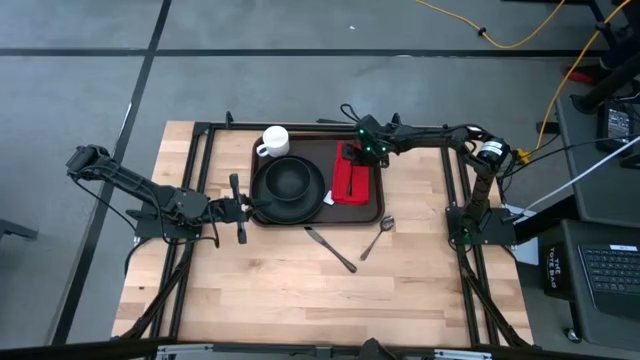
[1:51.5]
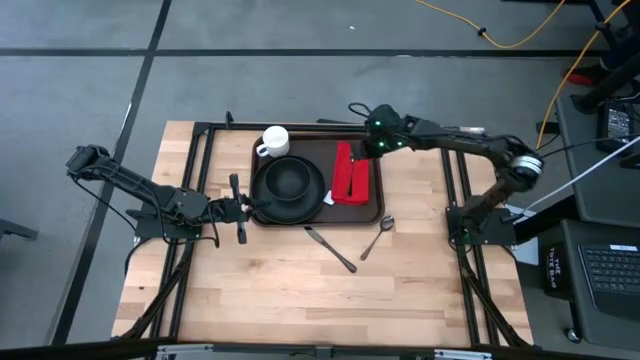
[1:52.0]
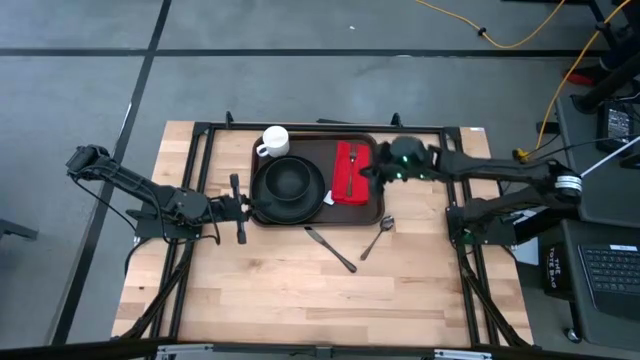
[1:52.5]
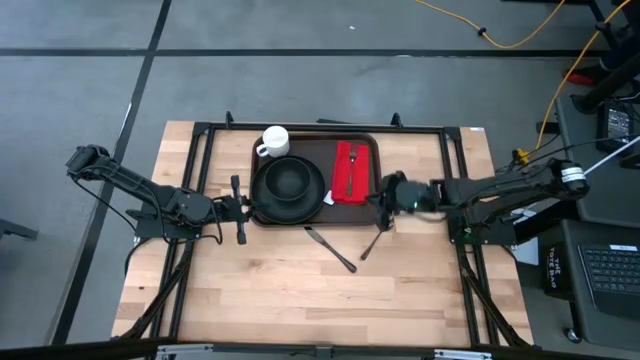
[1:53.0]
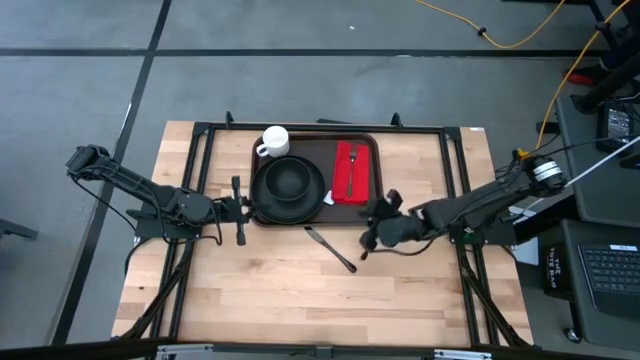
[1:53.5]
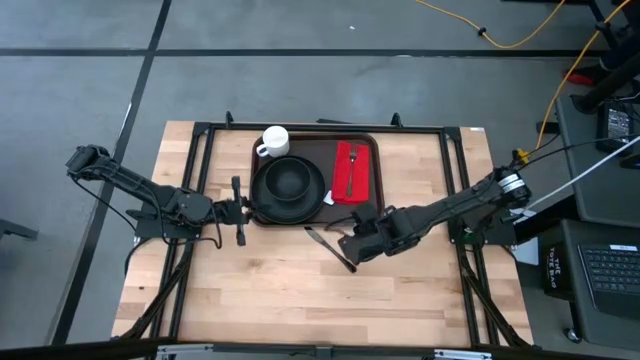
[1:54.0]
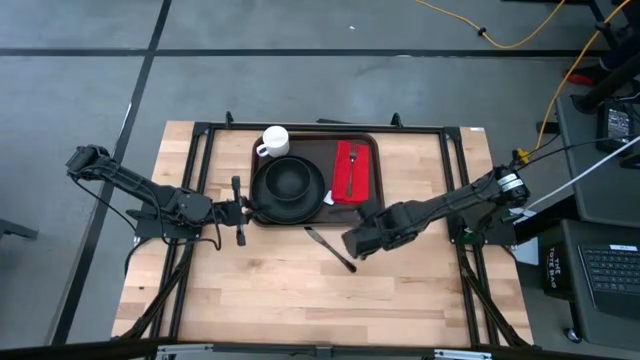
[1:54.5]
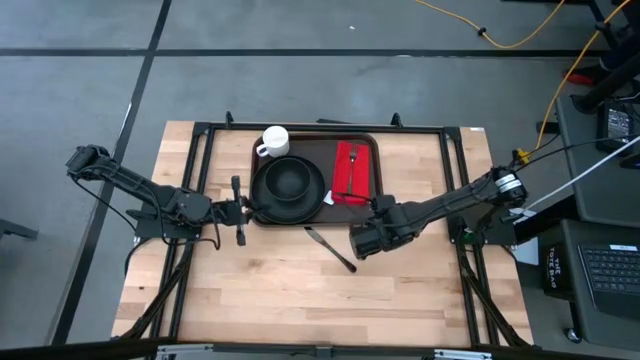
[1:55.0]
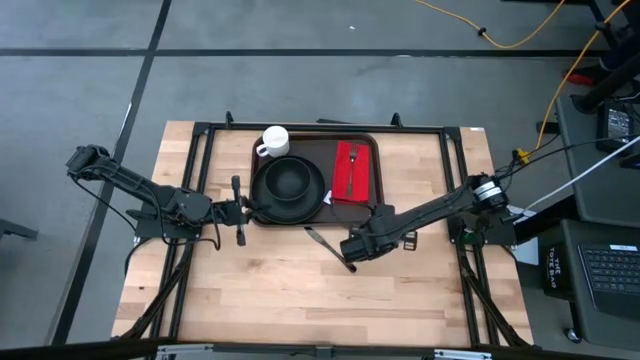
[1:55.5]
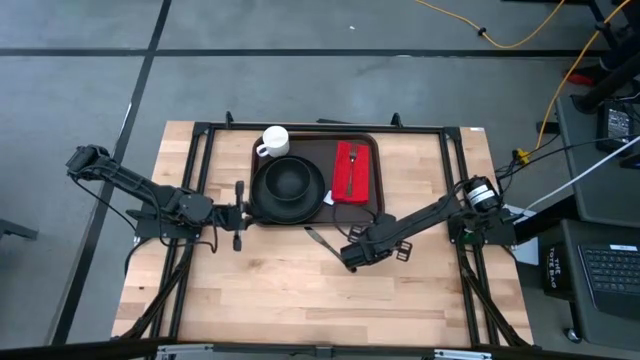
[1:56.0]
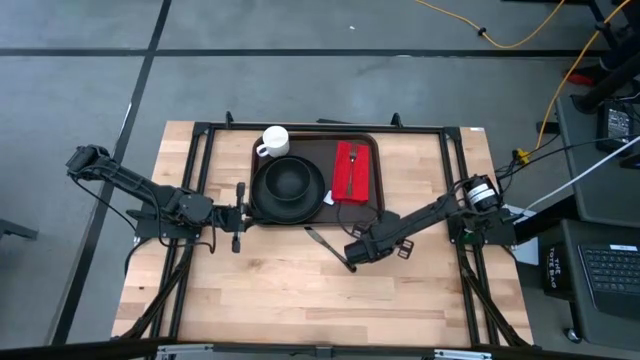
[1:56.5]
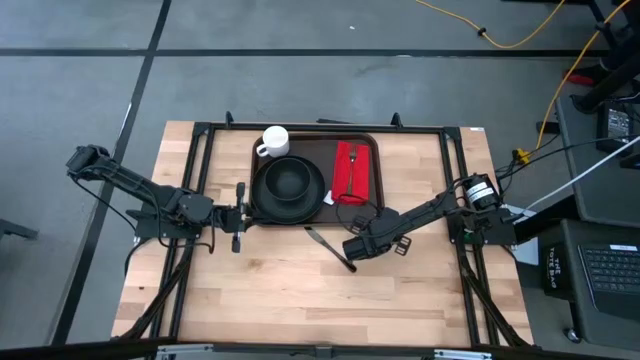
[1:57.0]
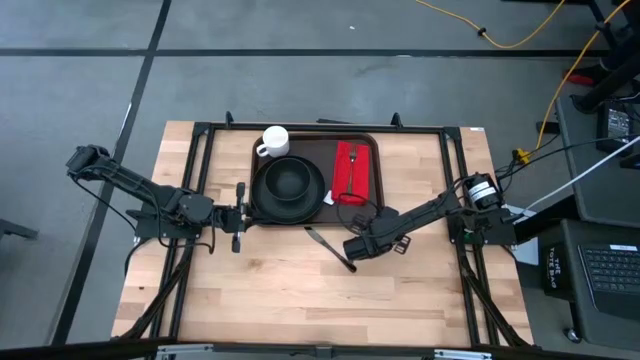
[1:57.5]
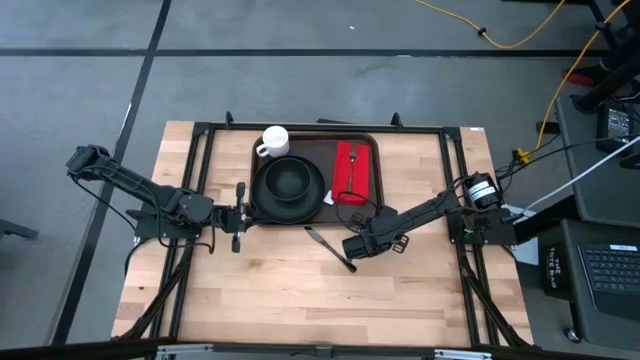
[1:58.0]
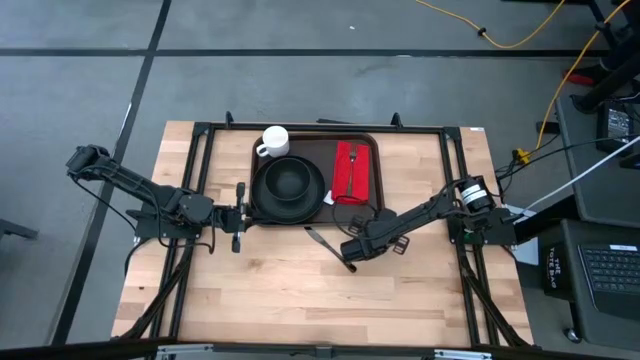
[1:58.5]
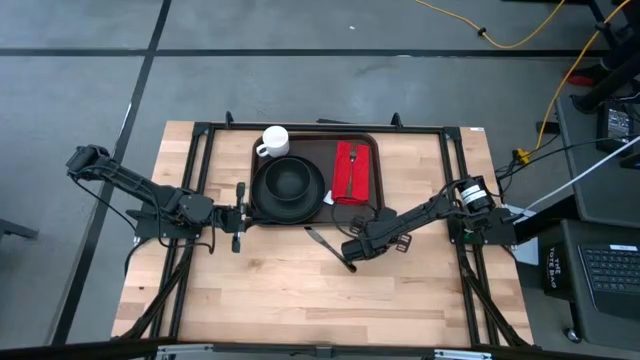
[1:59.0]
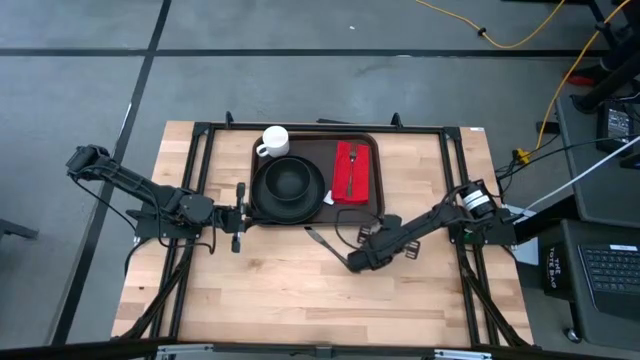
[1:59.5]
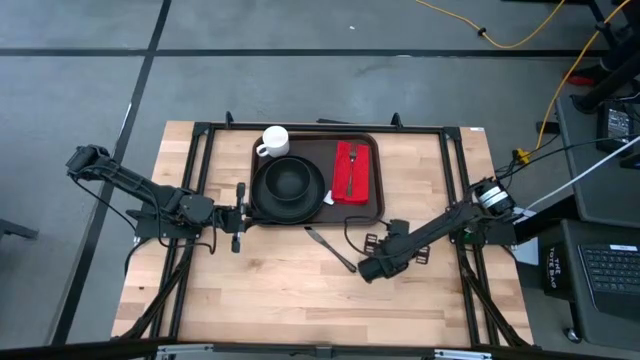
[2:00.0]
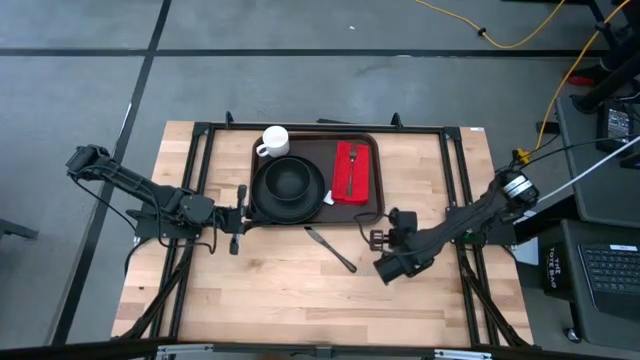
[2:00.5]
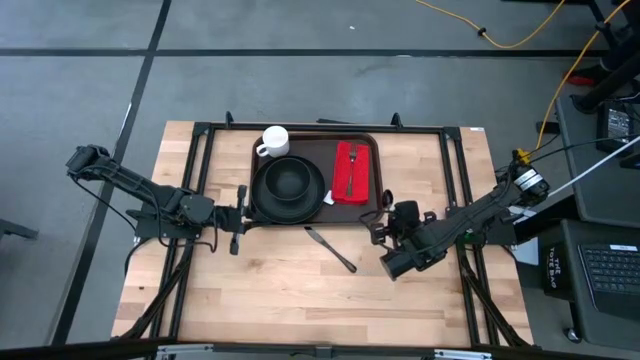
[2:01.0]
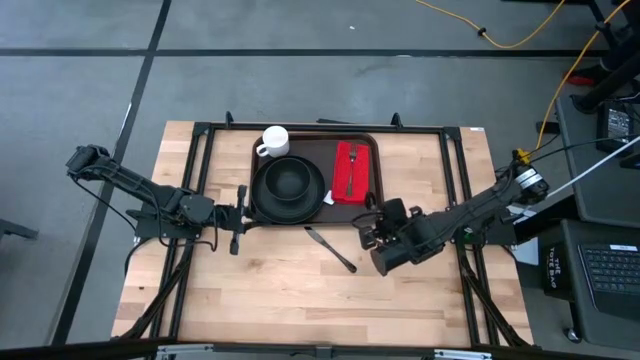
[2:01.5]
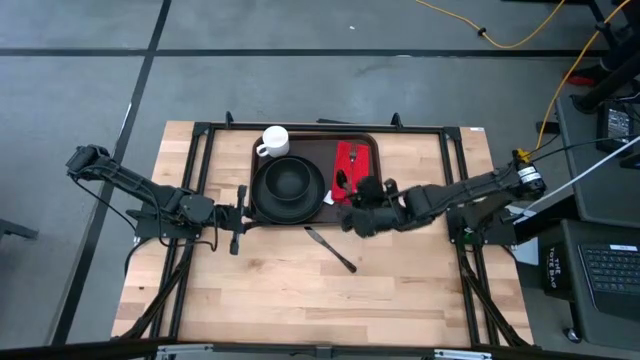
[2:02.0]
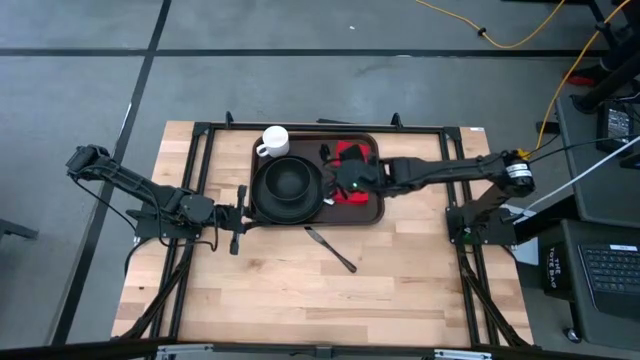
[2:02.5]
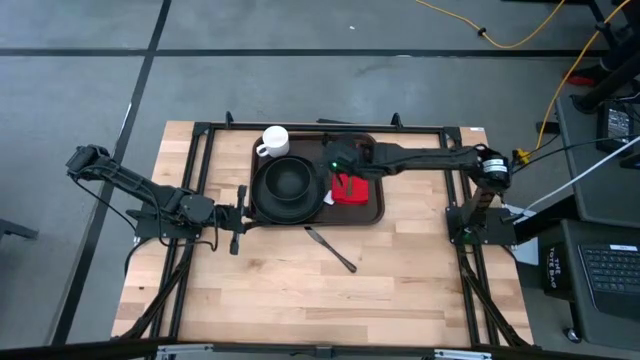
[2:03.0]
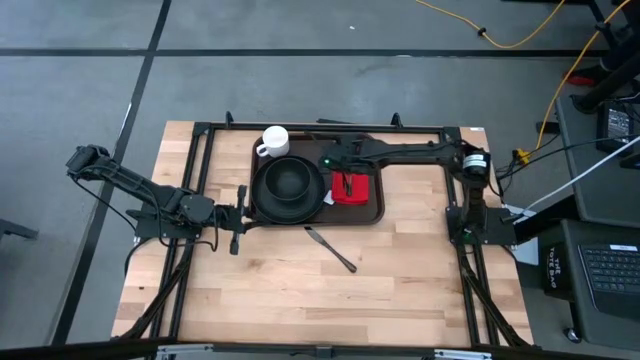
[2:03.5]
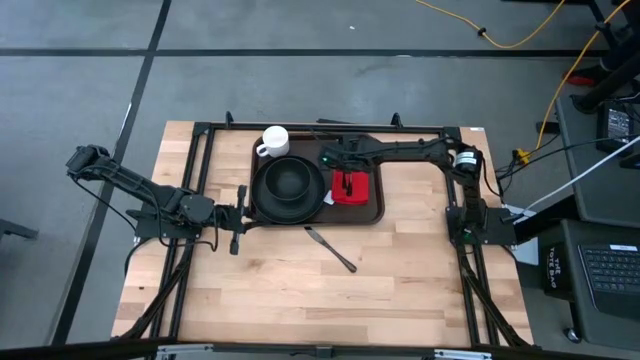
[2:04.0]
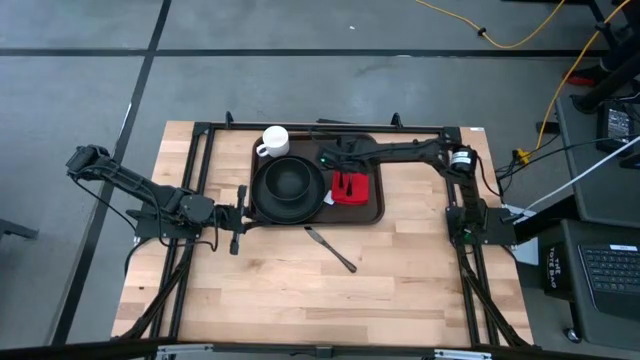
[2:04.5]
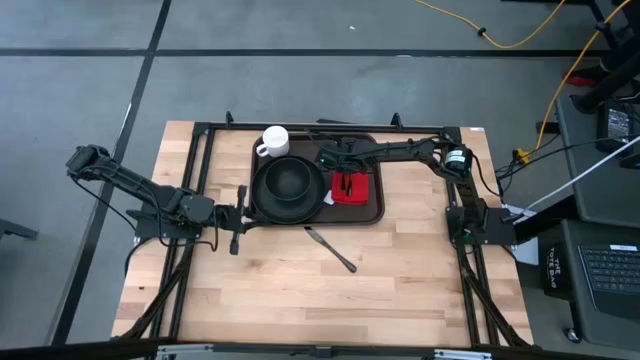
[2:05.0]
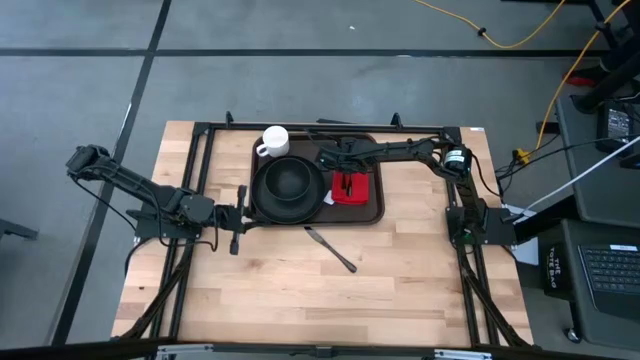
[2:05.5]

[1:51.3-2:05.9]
Task: Set up tray
Put the black spoon to the left of the black fork on top of the red table napkin on the brown serving tray

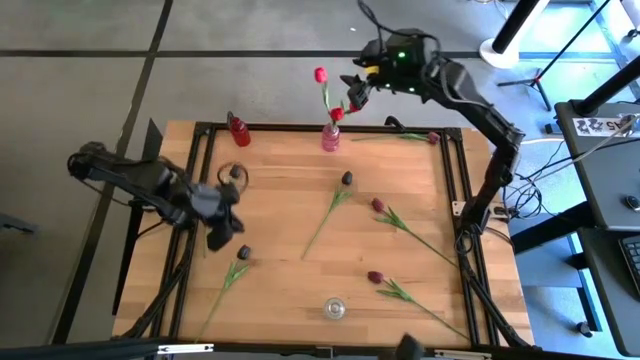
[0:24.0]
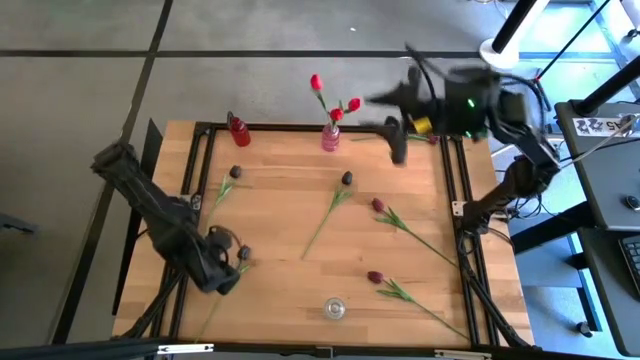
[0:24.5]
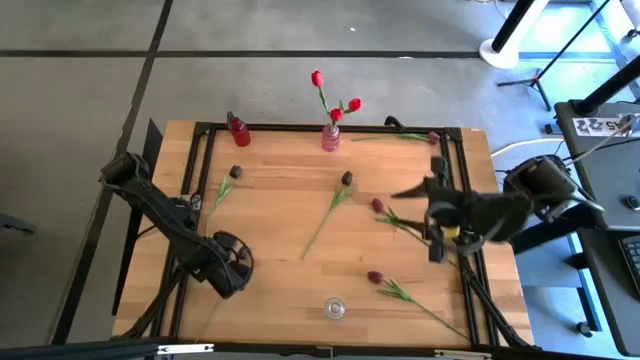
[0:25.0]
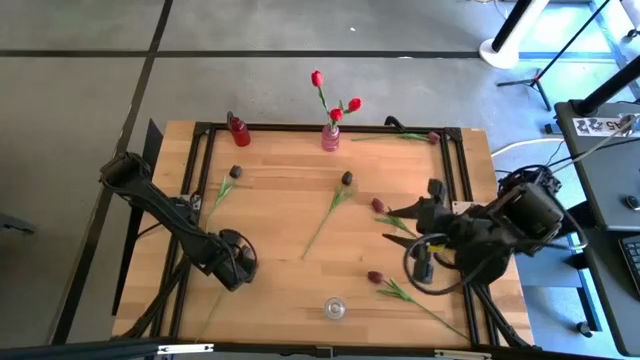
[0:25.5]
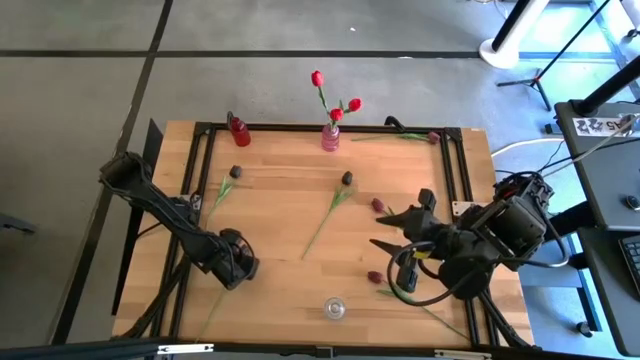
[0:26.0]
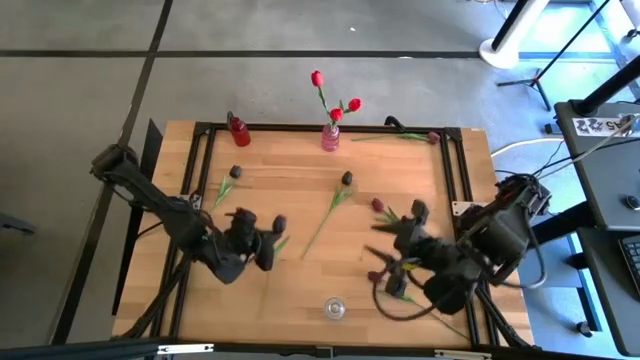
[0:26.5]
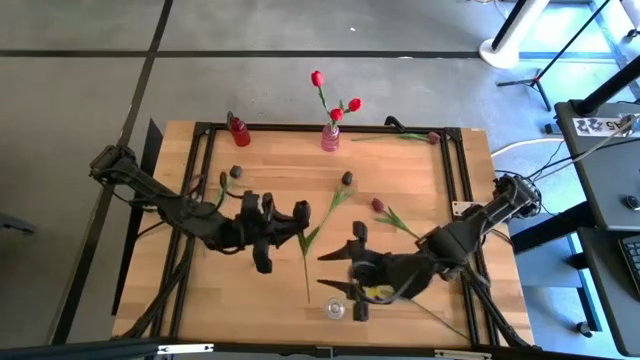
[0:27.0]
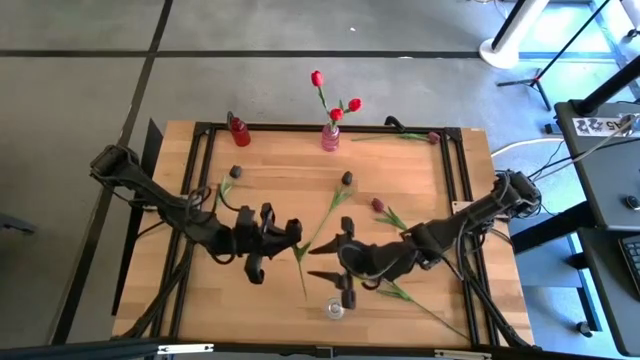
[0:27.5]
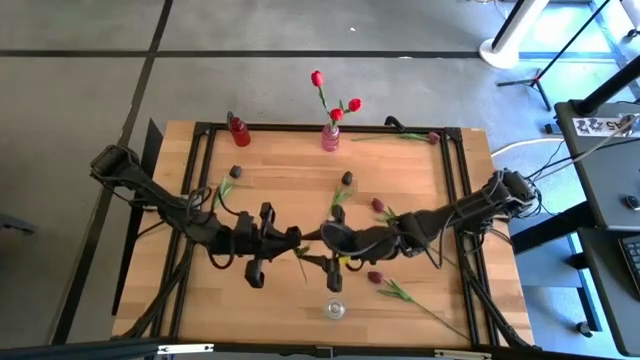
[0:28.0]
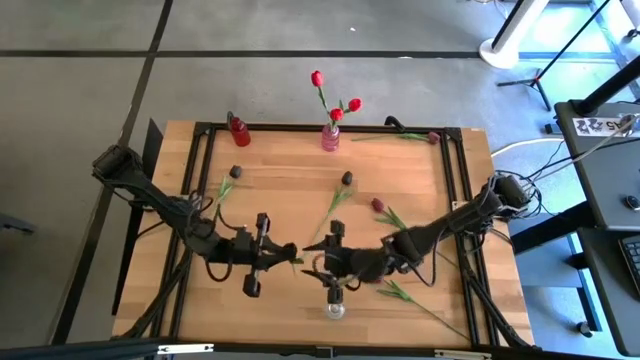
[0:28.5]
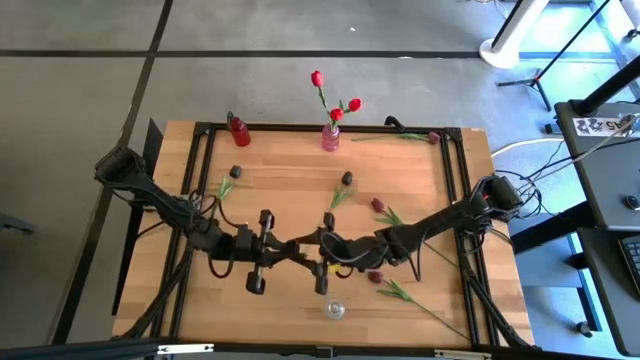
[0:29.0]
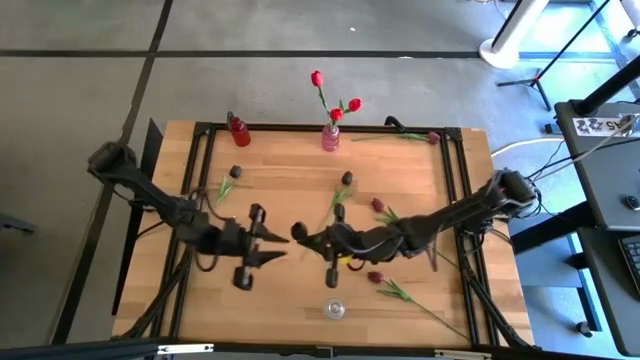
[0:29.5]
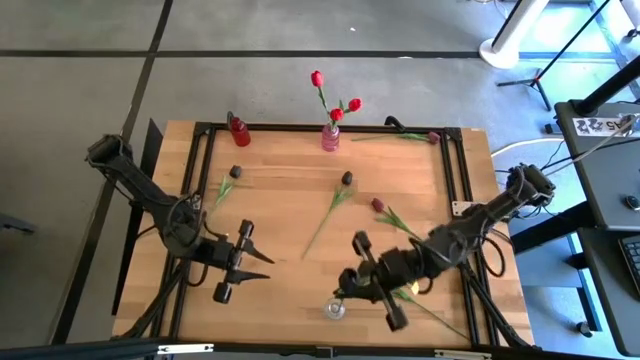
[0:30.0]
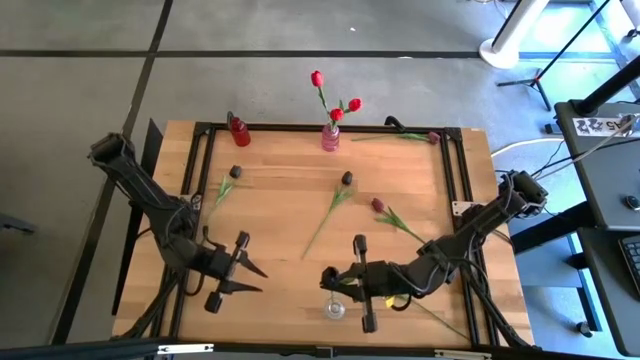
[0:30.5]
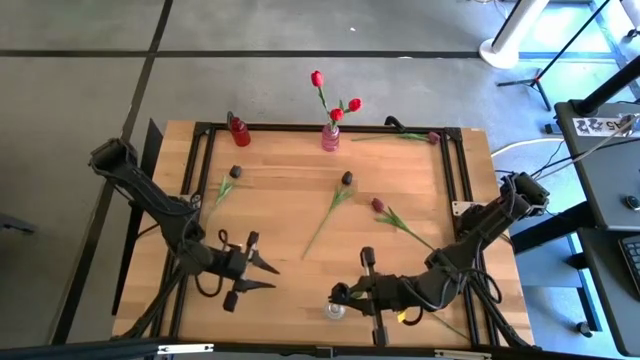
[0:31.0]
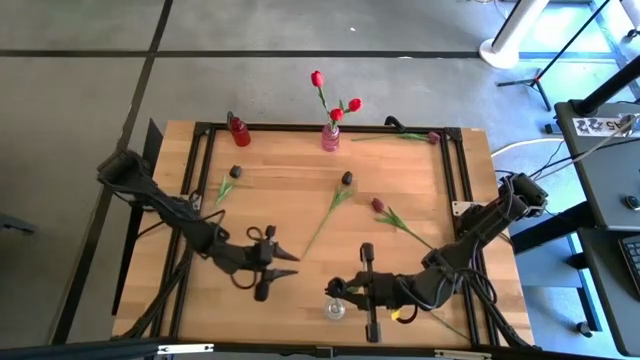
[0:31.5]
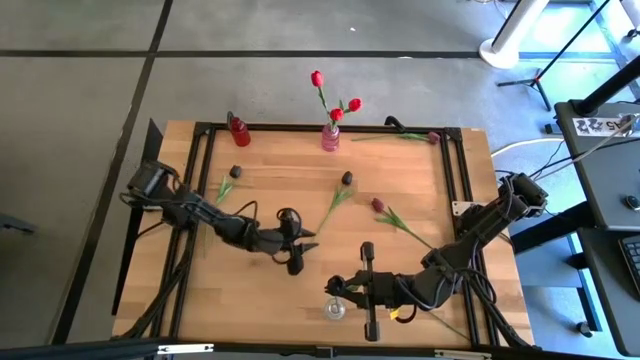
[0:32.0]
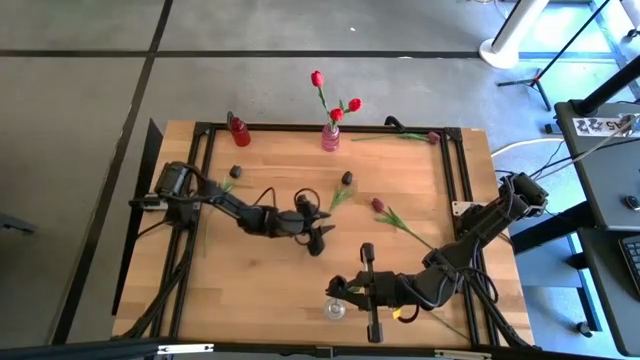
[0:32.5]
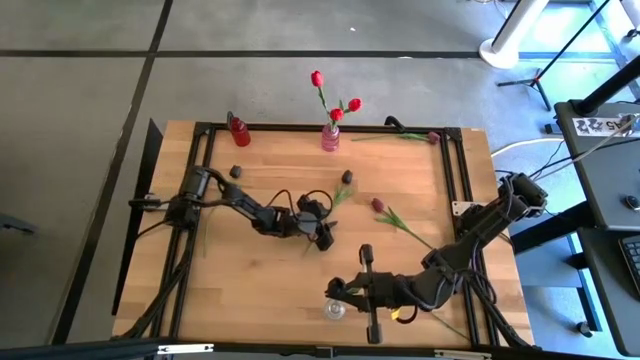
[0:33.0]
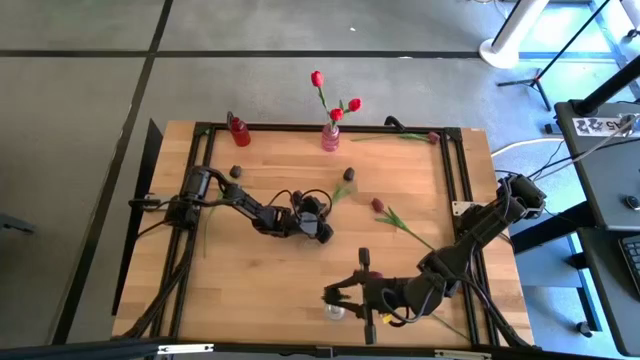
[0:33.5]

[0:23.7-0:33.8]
Task: Sort flowers into vase by color
Put the bottom black flower into the transparent flower vase
